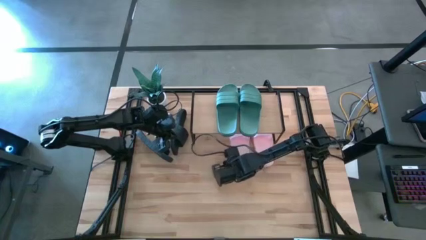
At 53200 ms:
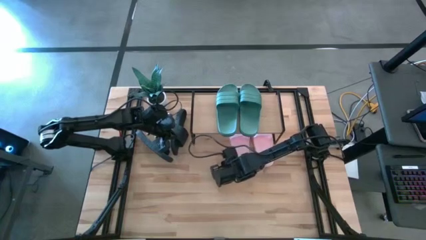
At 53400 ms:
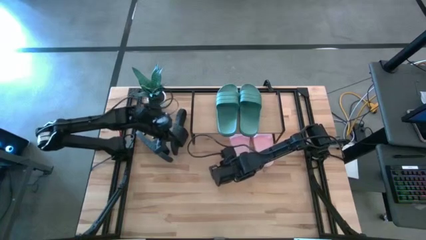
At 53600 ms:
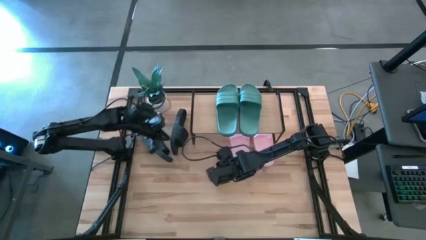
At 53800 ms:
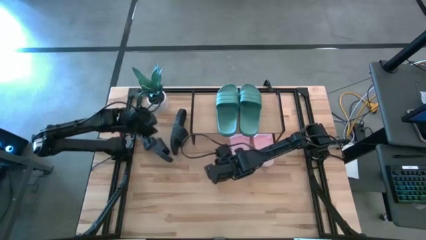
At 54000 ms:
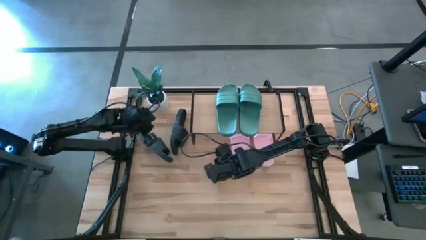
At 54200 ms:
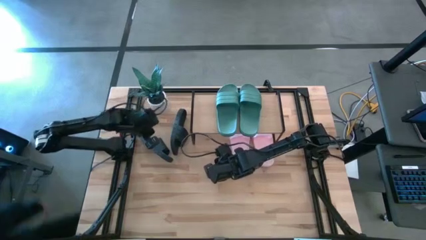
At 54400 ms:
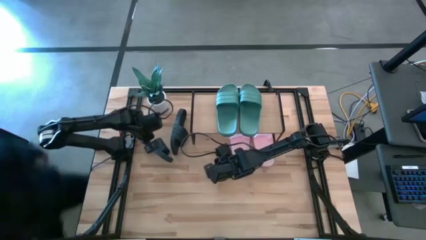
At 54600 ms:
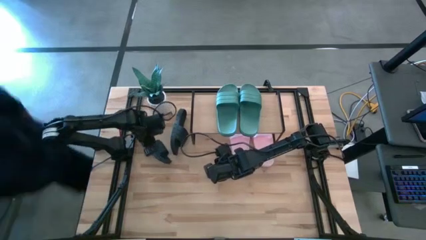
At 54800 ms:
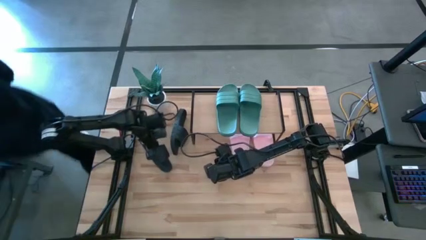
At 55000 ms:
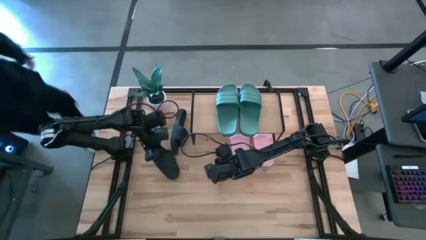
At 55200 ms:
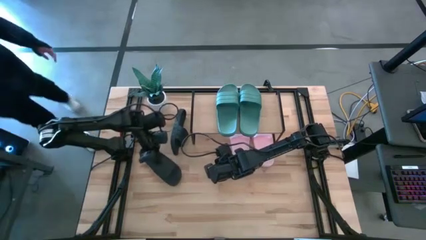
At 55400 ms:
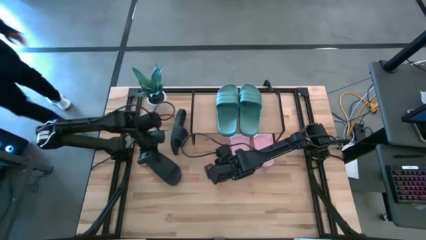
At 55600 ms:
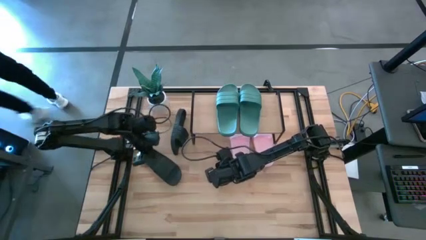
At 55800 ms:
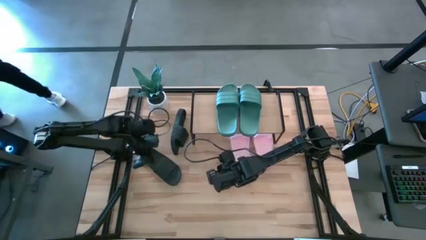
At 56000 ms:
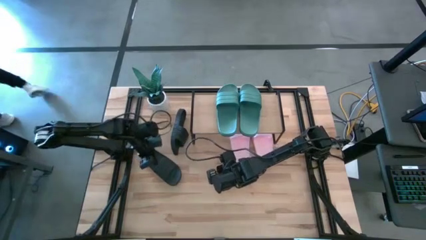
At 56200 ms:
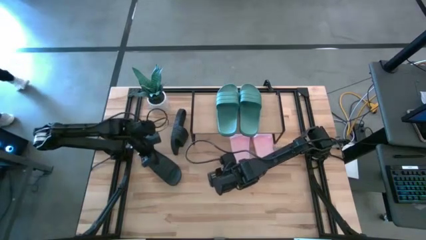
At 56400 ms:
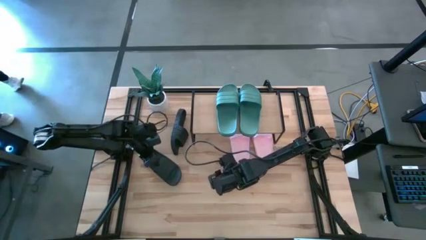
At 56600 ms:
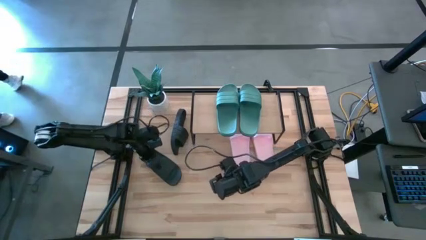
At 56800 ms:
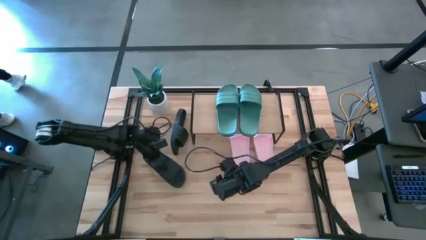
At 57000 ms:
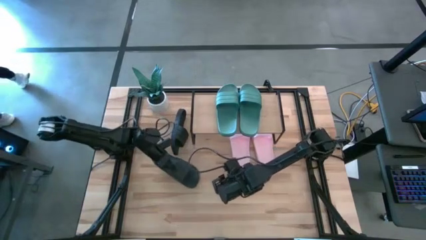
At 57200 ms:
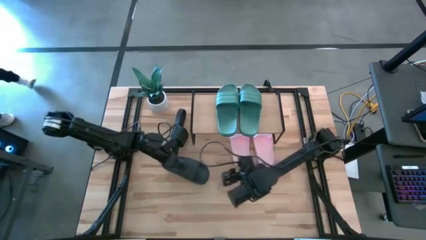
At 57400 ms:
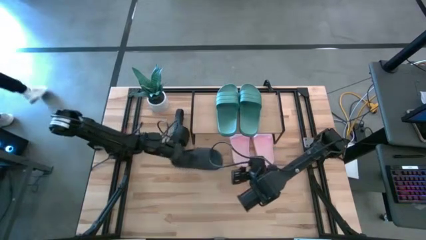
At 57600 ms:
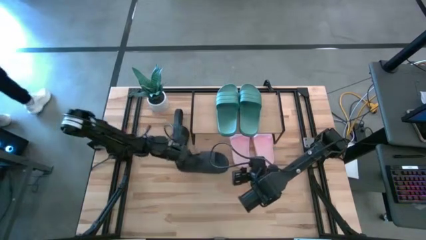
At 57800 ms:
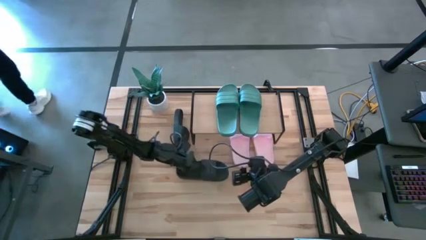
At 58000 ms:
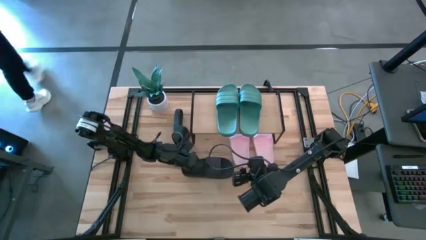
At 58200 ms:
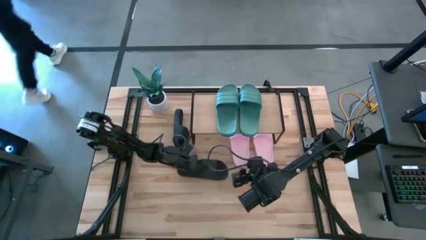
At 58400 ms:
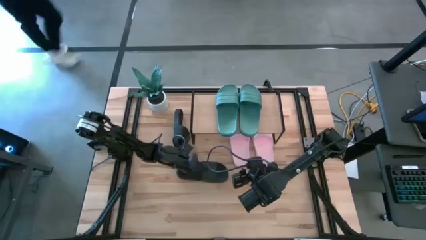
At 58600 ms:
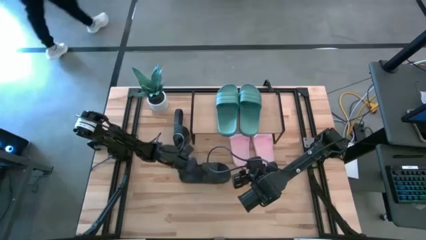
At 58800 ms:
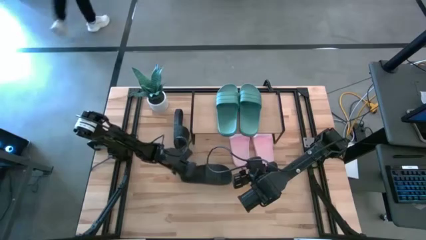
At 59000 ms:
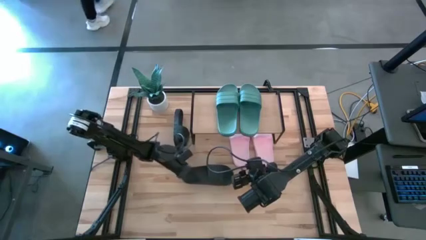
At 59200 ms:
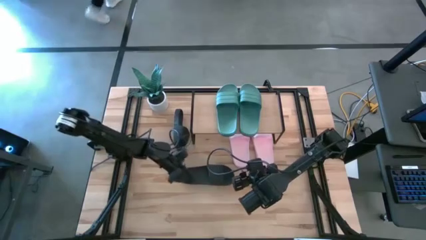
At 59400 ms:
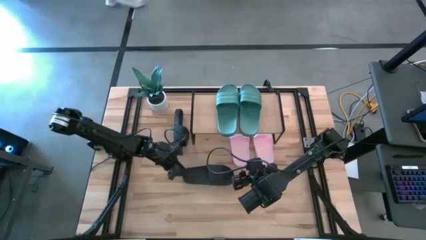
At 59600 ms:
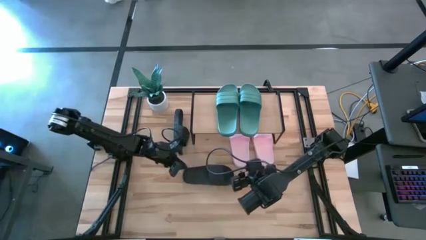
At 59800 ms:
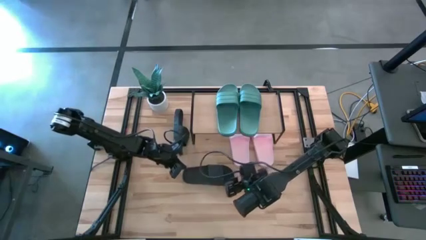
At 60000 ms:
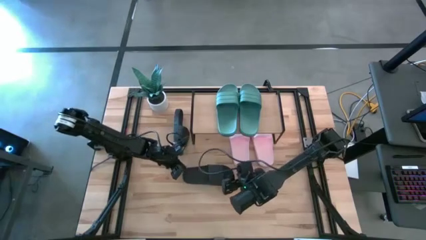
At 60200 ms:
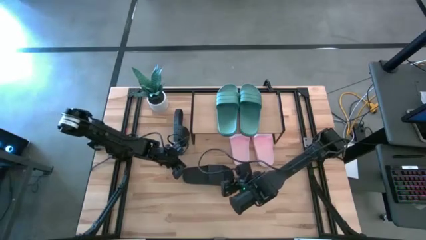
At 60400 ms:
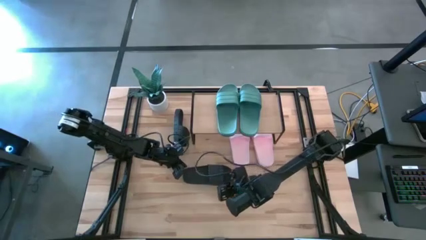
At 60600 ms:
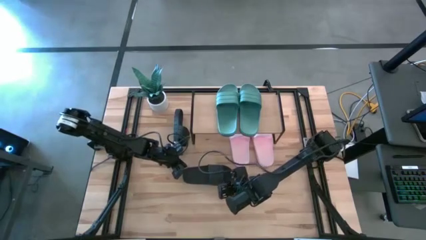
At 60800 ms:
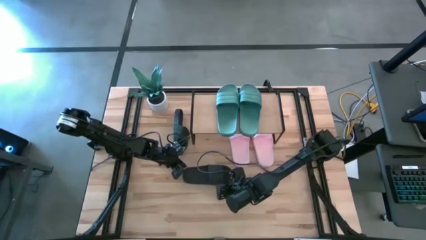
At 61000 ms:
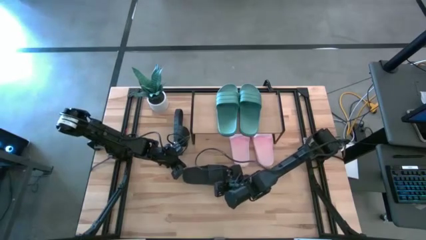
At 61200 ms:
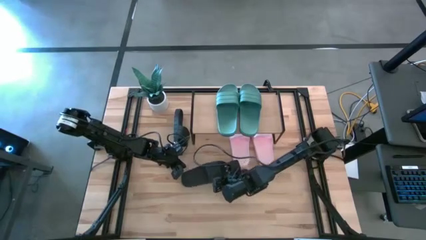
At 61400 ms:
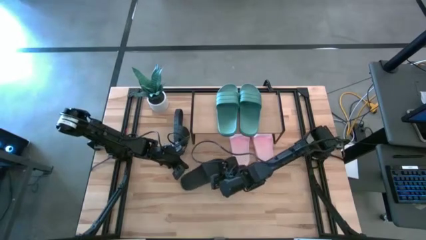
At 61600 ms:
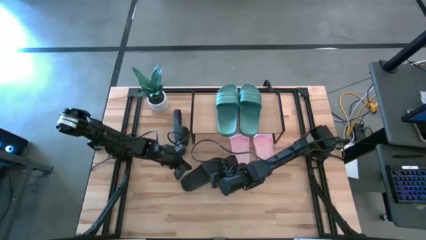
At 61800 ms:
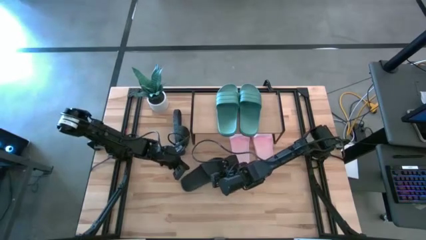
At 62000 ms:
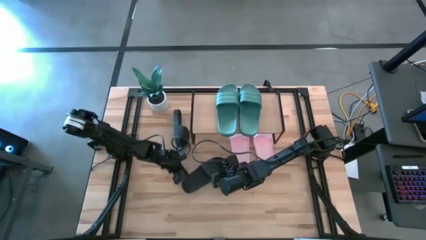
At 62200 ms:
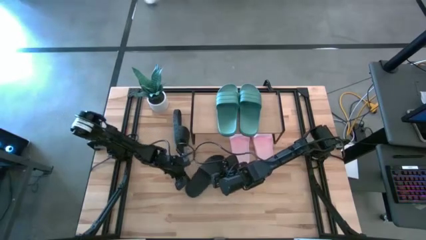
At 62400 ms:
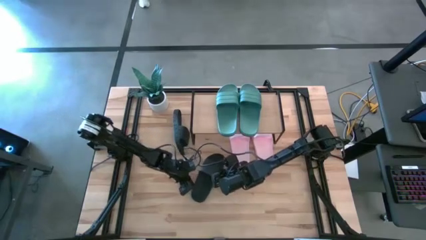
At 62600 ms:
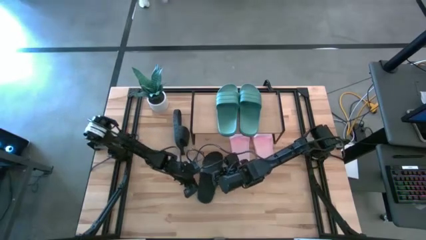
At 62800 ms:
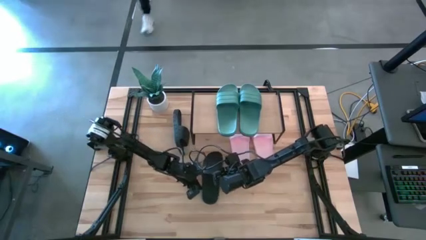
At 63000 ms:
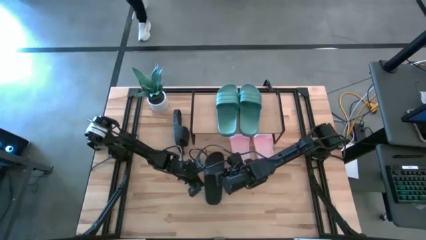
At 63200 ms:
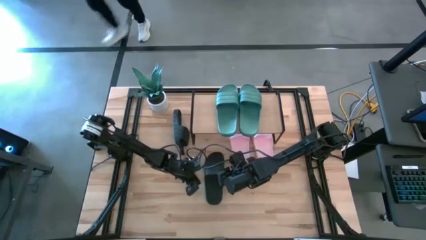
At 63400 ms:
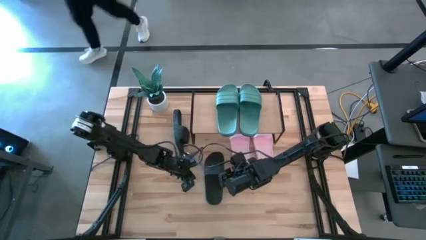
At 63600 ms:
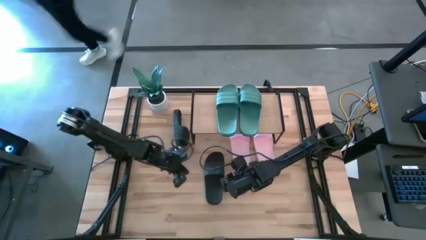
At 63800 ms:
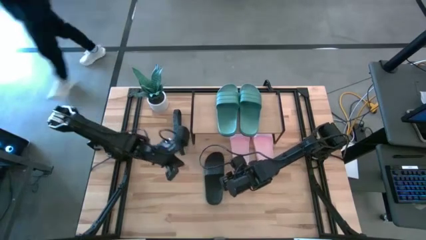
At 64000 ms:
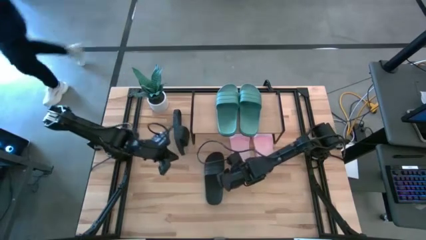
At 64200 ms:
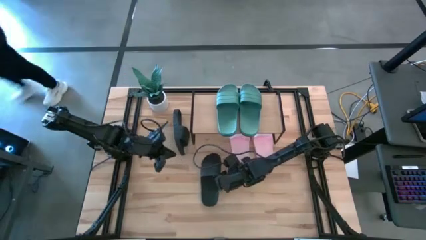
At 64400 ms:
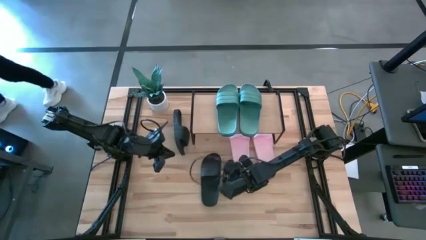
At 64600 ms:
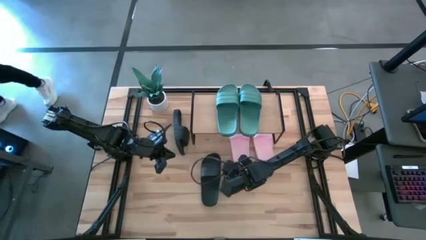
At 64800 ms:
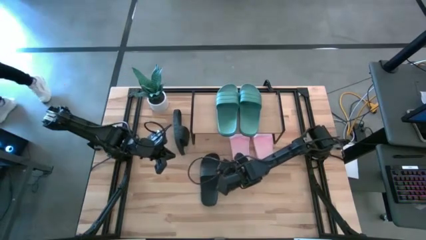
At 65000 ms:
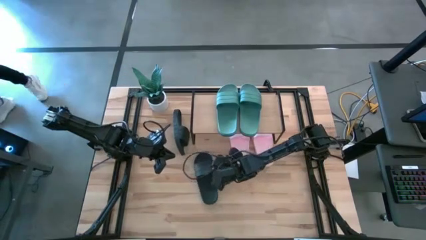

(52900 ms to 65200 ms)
Task: Pick and place slides into the shelf
Move the left black slipper to the middle of the table

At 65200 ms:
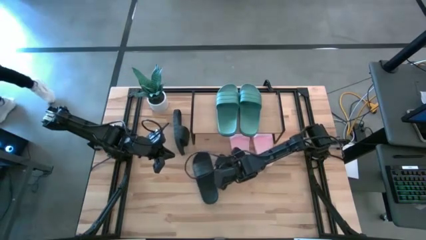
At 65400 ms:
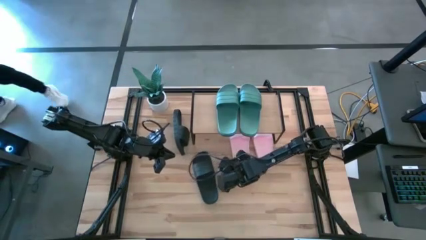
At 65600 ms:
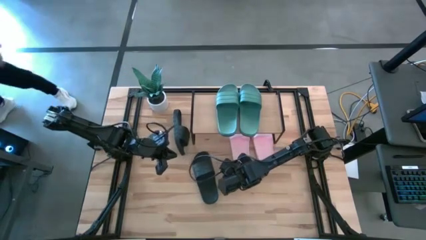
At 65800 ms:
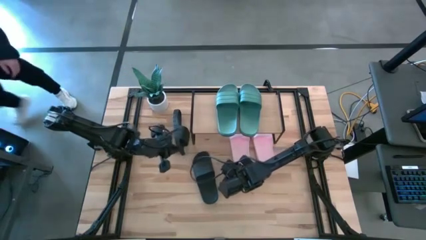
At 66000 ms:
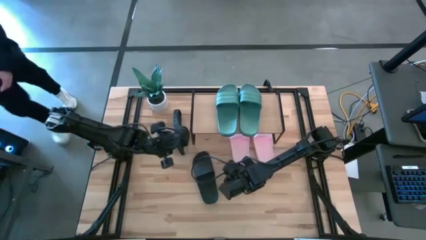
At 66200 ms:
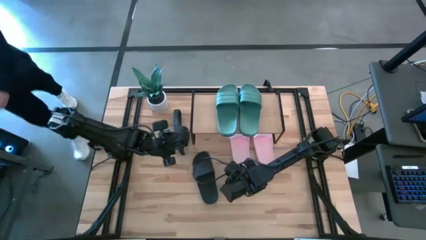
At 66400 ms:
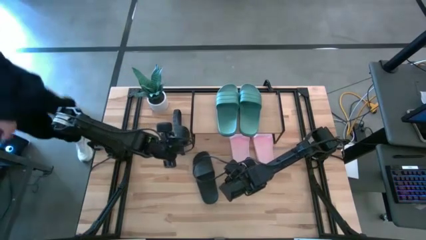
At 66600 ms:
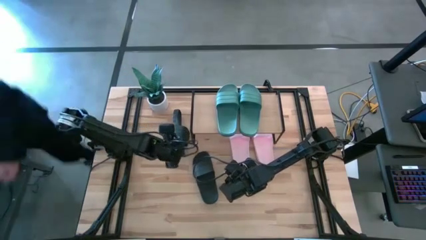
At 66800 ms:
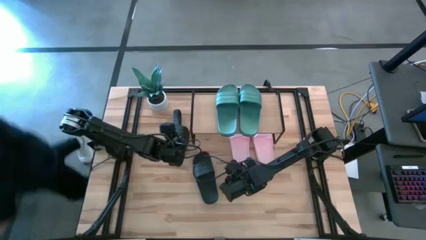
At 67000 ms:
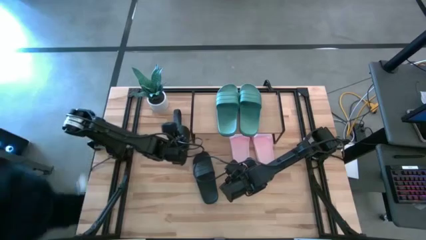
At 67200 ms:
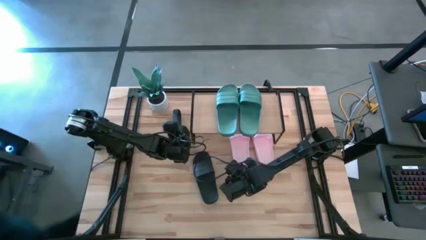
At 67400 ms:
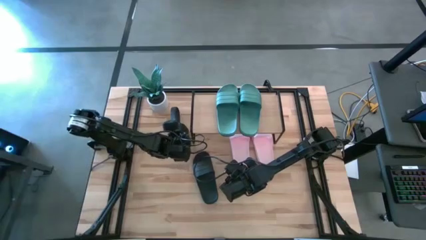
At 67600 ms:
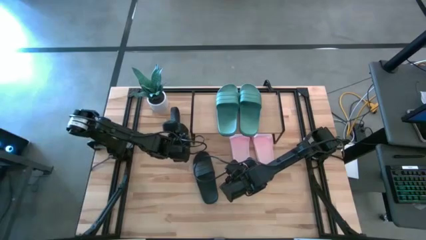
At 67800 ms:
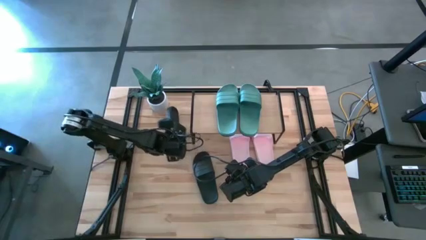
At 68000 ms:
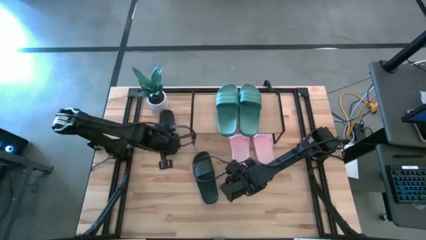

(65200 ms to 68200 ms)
Move the left black slipper to the right of the left black slipper
